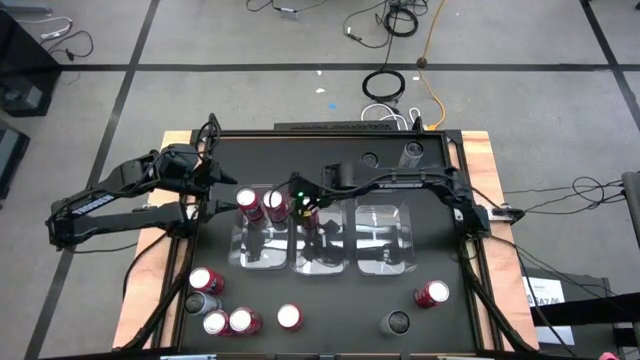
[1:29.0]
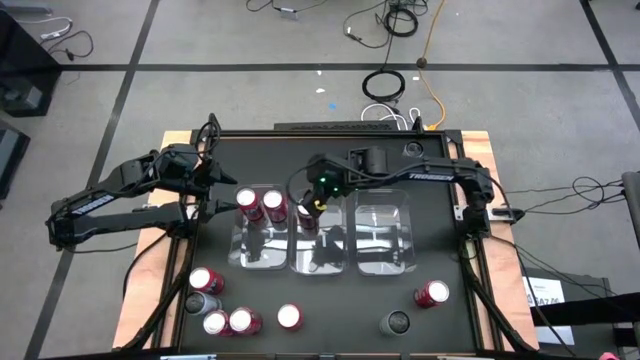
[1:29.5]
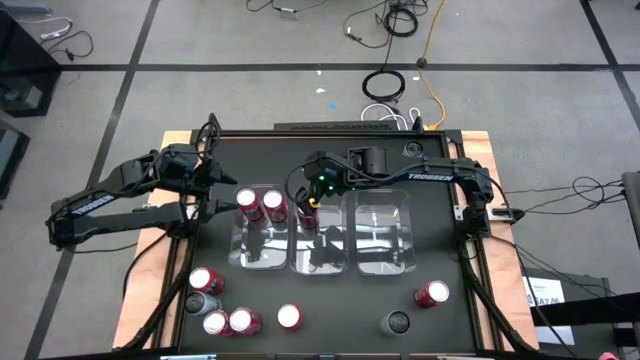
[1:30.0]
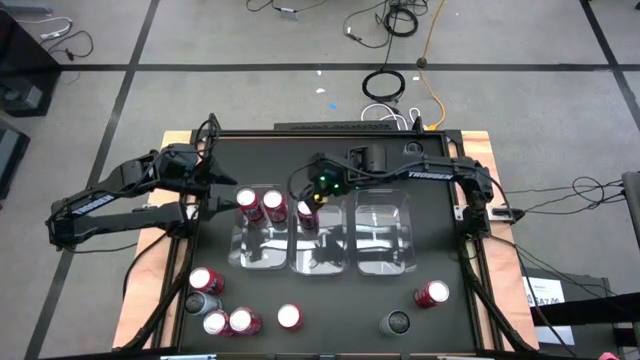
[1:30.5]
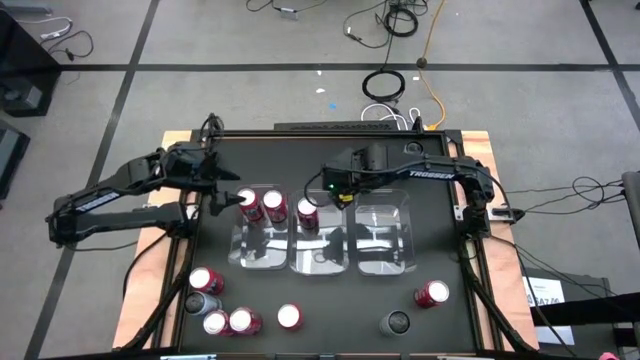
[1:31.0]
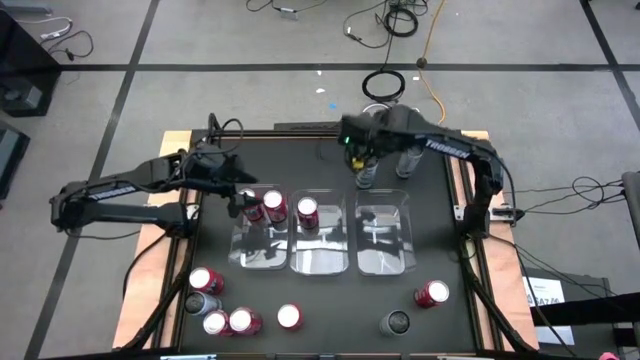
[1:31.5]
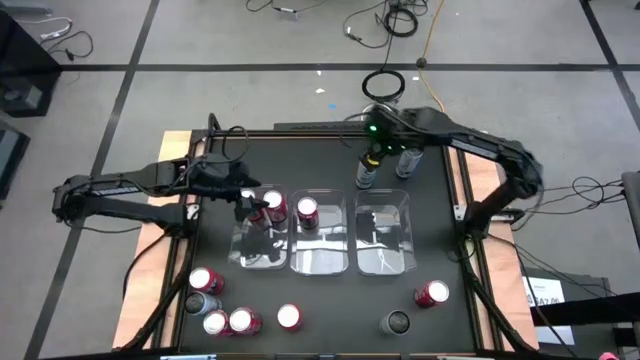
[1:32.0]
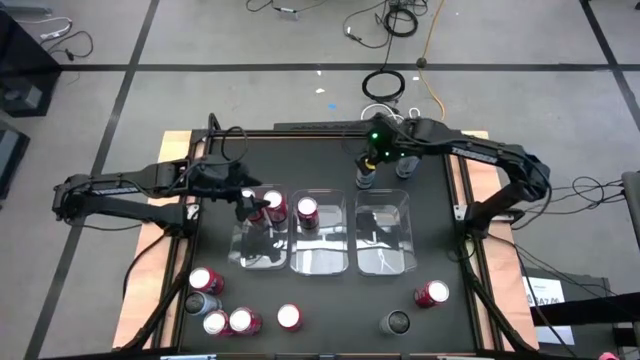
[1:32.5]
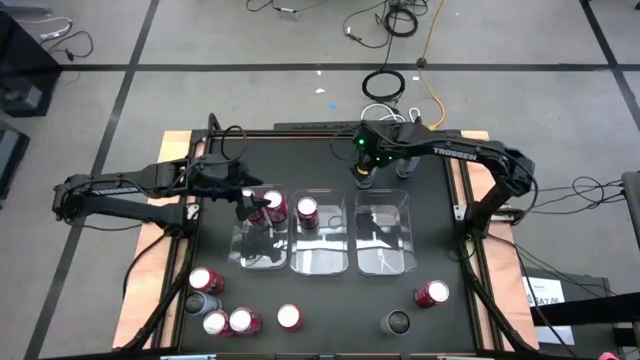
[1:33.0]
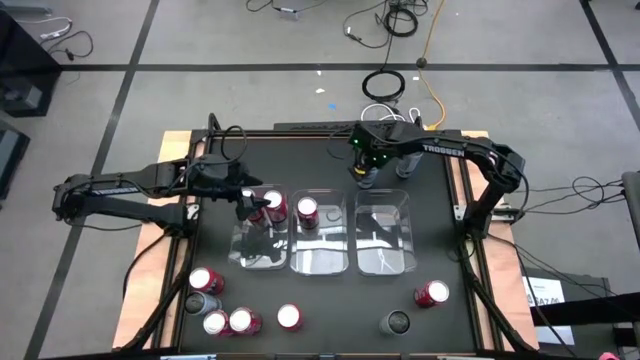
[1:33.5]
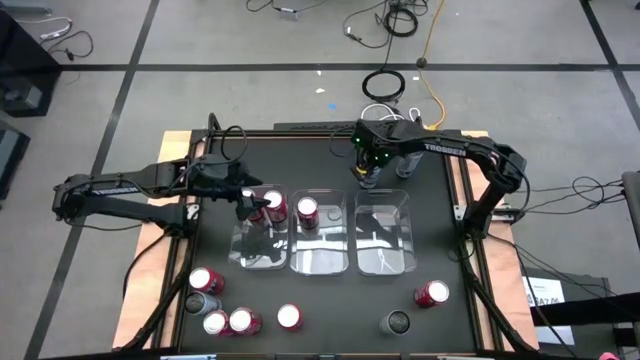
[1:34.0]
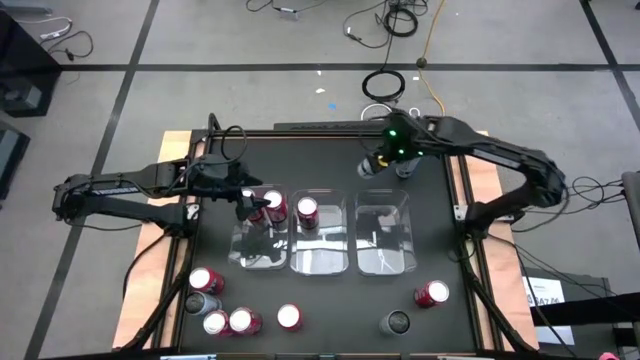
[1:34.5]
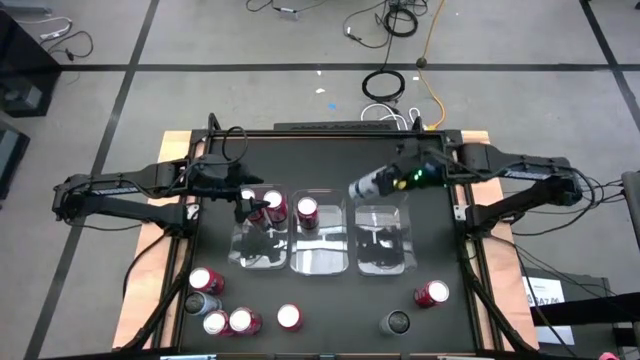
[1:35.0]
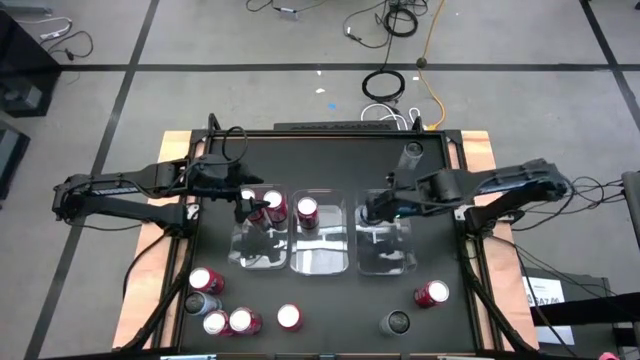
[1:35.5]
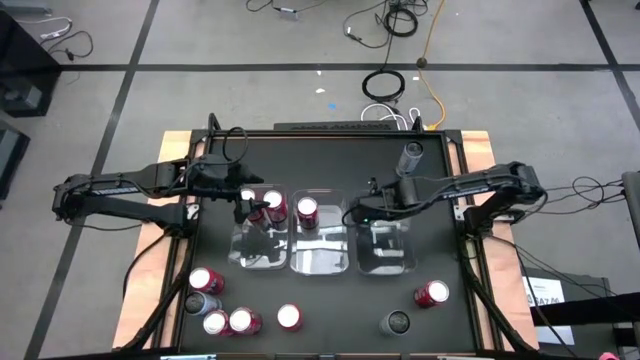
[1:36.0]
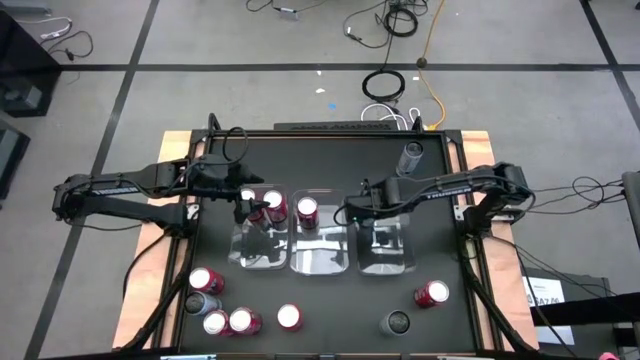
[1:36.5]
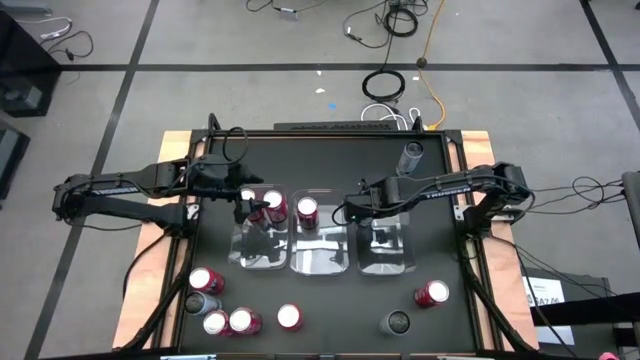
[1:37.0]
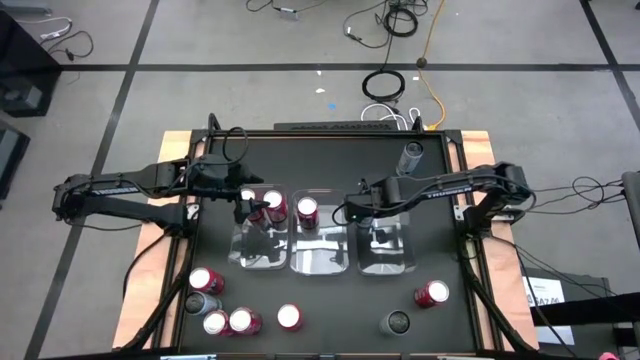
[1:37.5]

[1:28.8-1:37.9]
Task: Sort soda cans
Put the top left white blue soda can into the right transparent bin

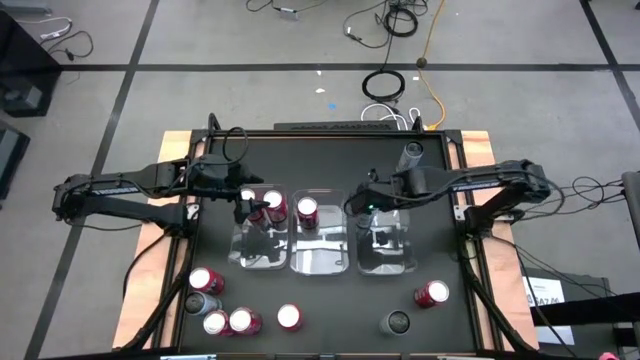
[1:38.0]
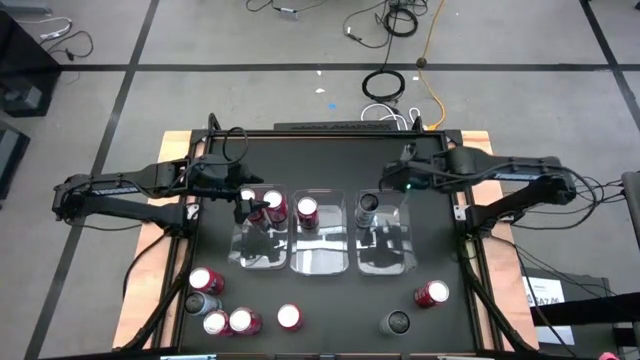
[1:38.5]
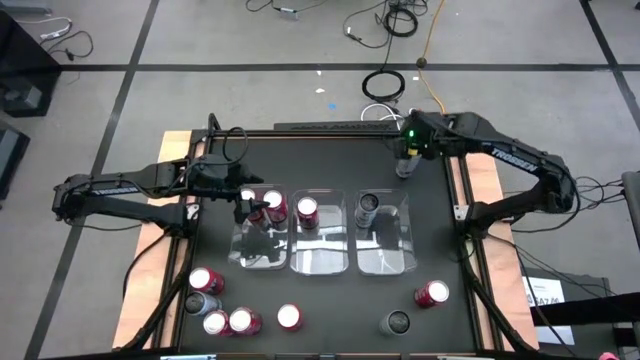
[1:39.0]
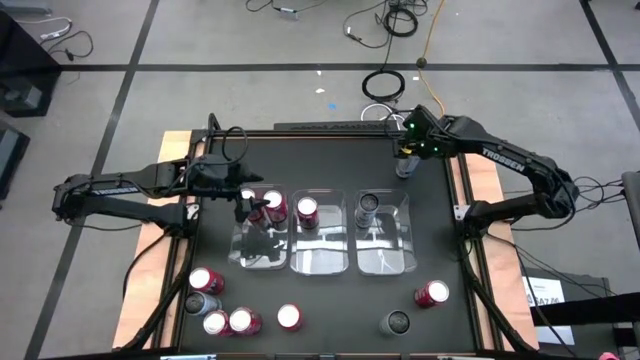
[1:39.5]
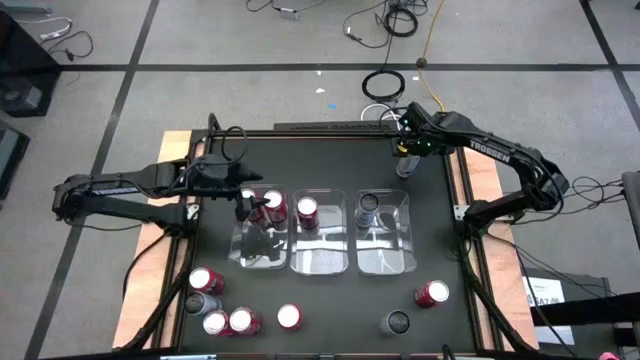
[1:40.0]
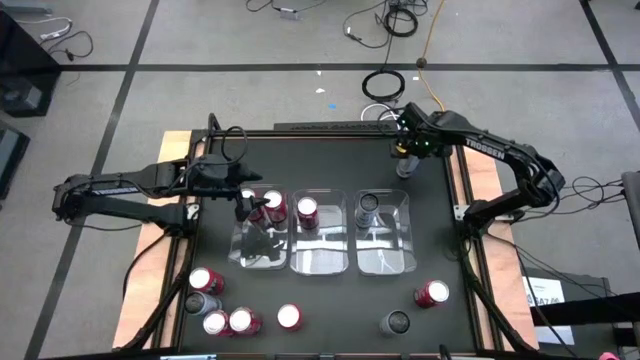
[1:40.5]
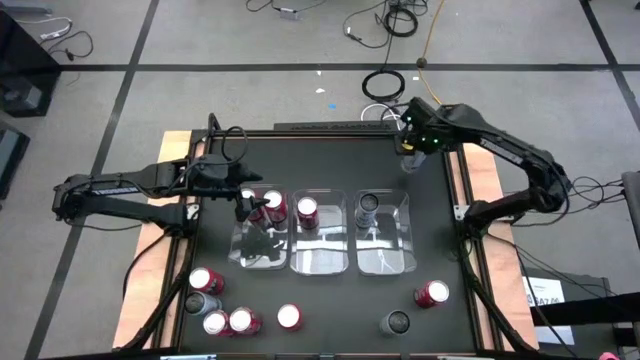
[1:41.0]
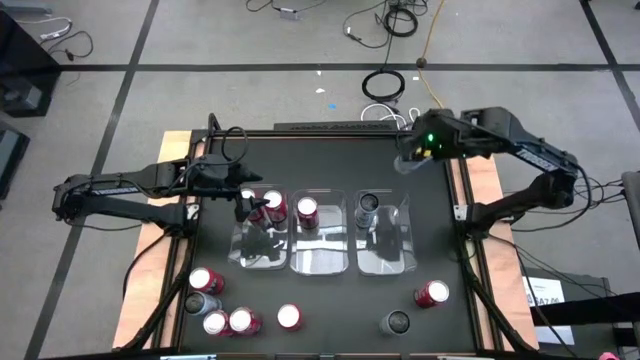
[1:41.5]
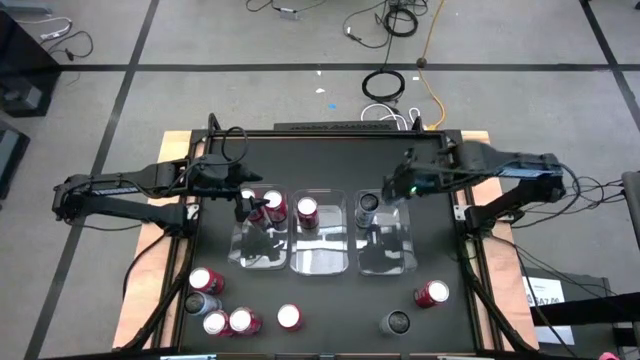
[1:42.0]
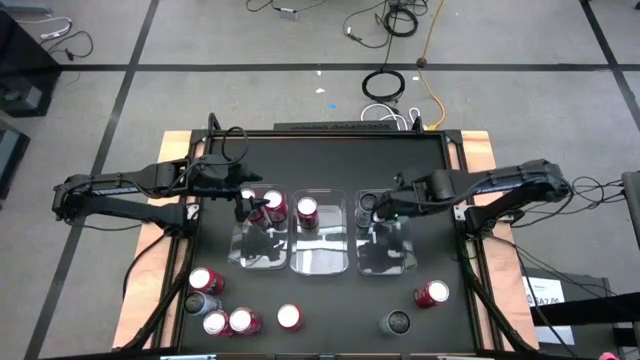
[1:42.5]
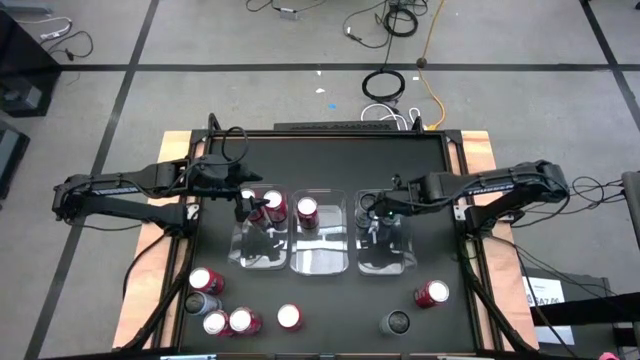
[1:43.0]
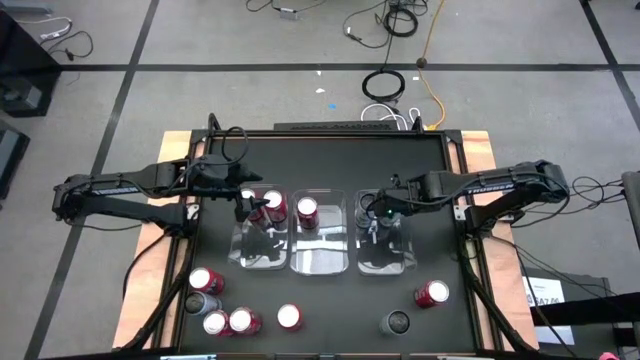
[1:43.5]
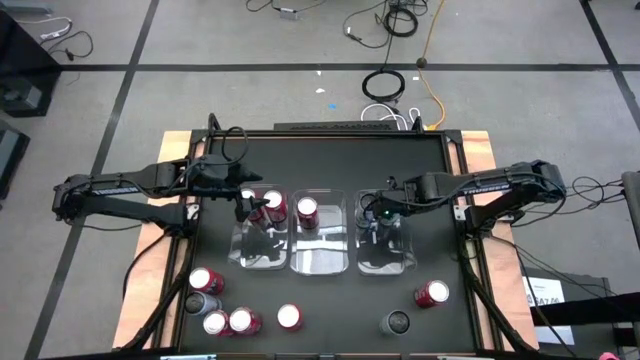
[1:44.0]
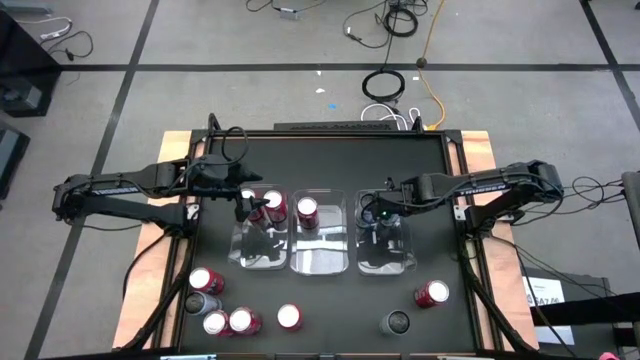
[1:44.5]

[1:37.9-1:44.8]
Put the top white blue soda can into the right transparent bin

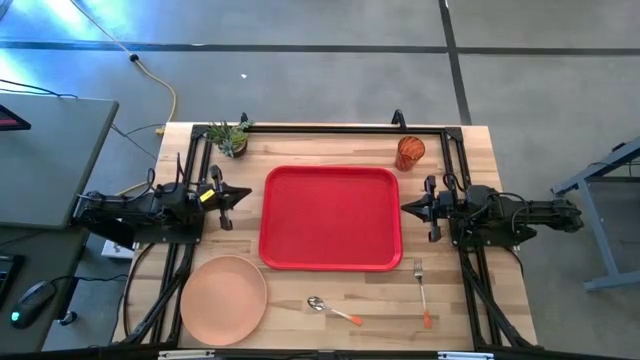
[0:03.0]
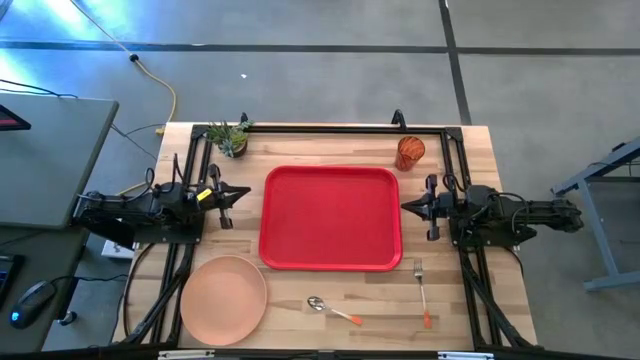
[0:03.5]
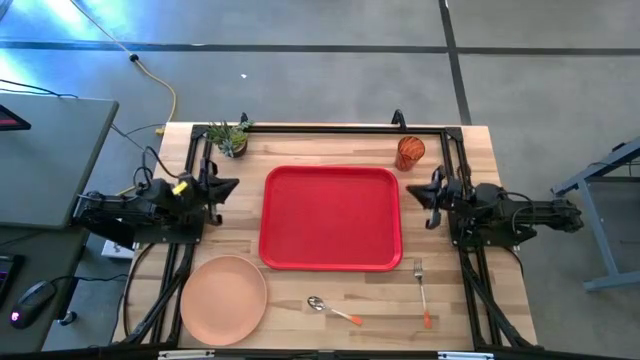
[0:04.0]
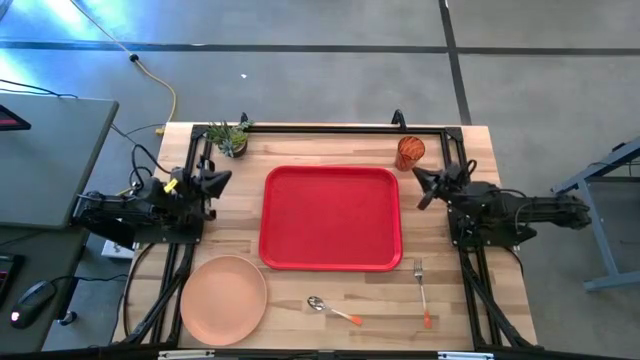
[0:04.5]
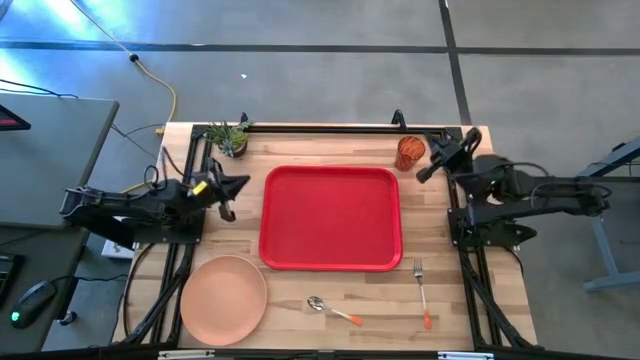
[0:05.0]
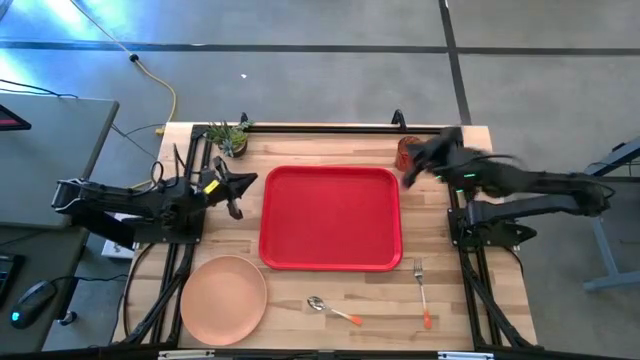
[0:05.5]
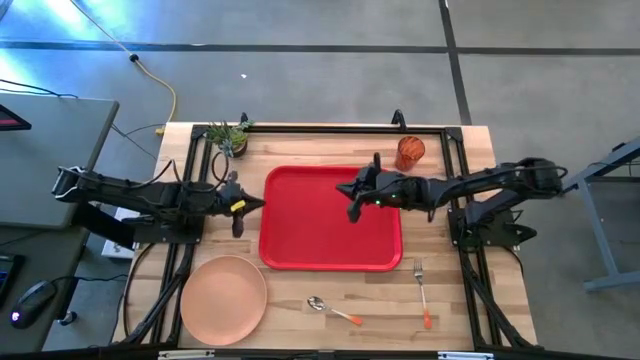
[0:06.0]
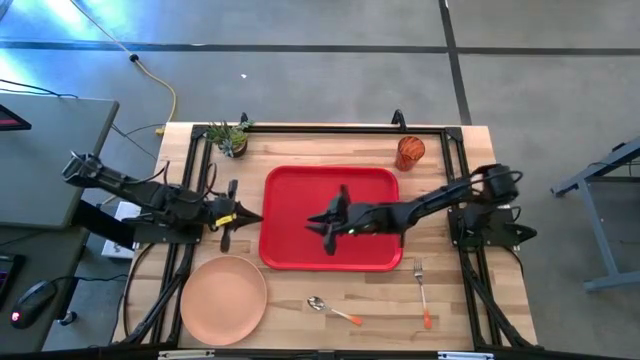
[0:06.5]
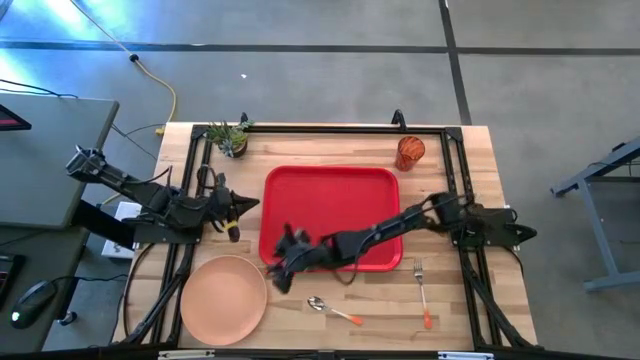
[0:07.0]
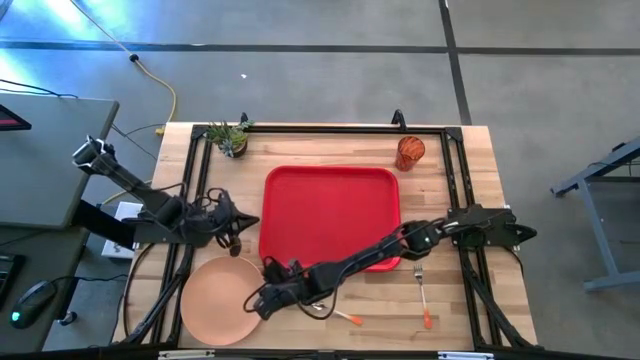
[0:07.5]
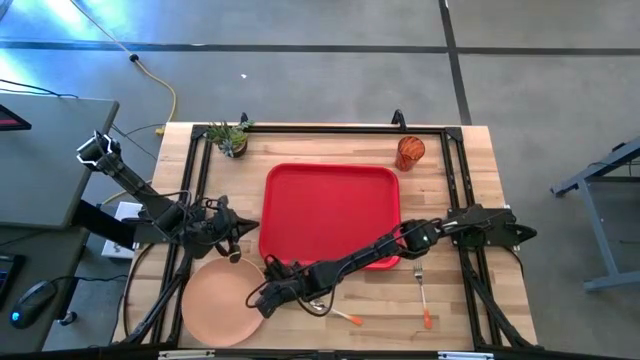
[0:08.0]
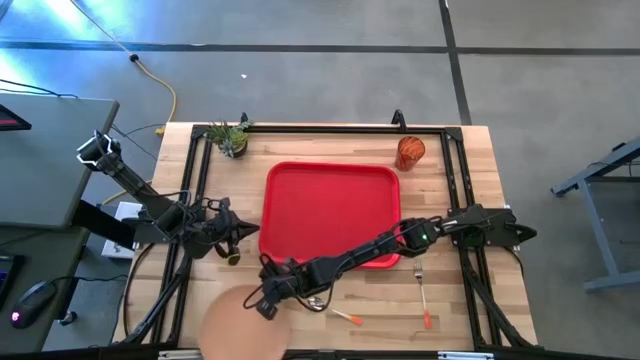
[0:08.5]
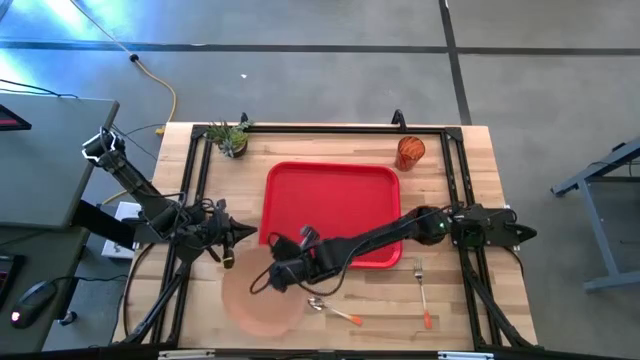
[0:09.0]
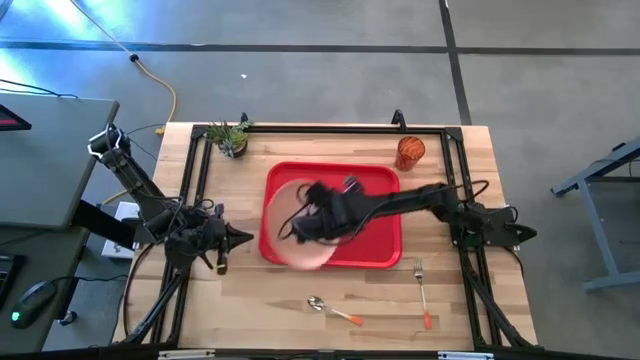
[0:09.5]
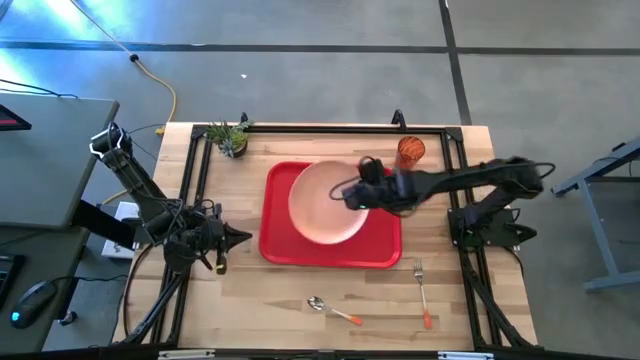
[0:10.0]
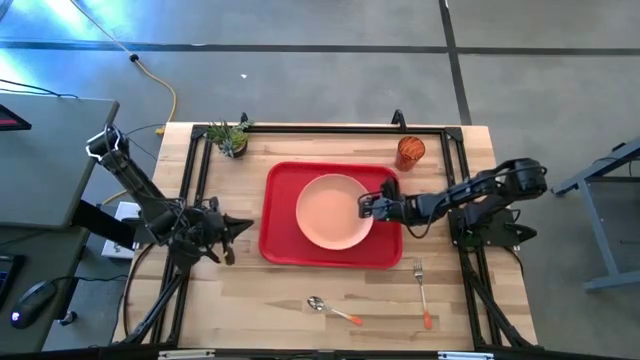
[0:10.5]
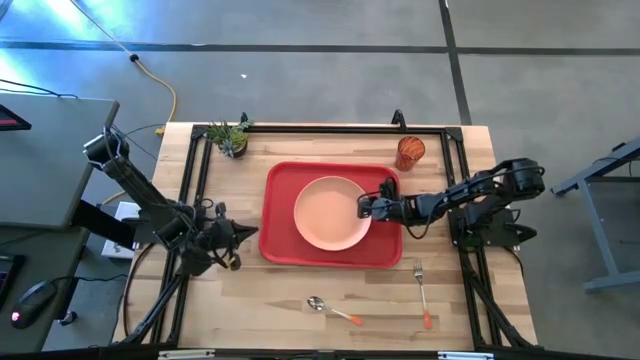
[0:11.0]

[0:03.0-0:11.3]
Task: Pick and place plate/cup/fork/spoon on tray
Put the light brown plate on the red tray
